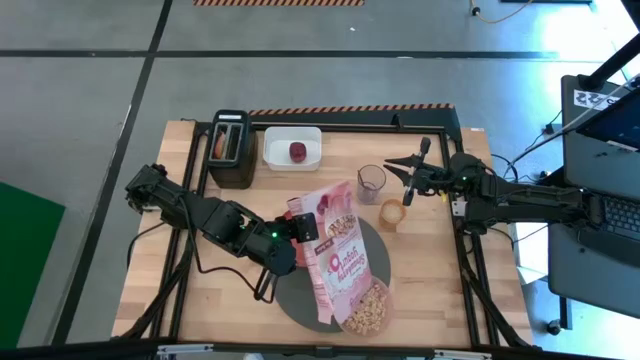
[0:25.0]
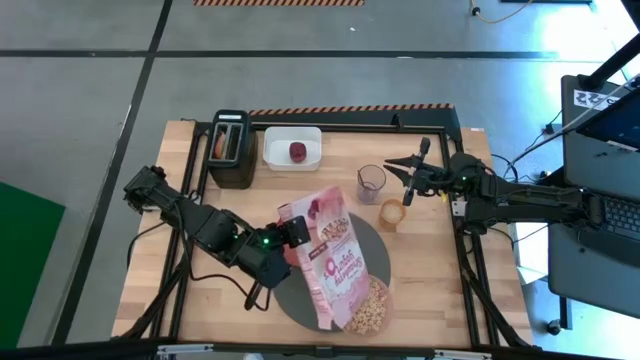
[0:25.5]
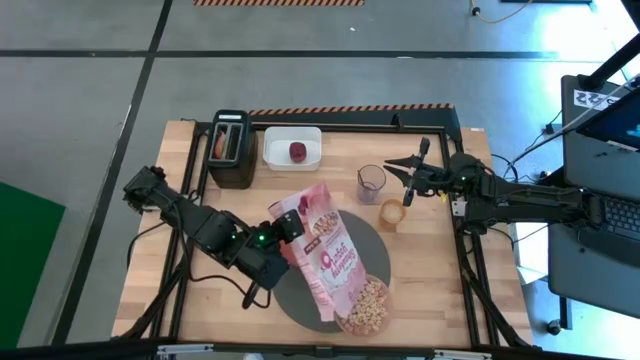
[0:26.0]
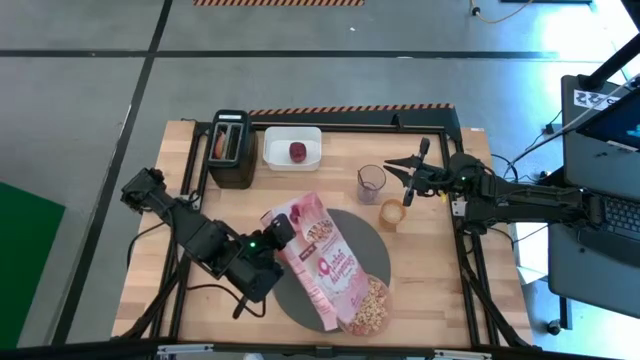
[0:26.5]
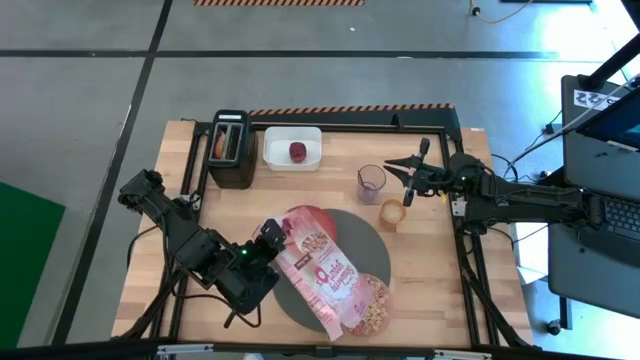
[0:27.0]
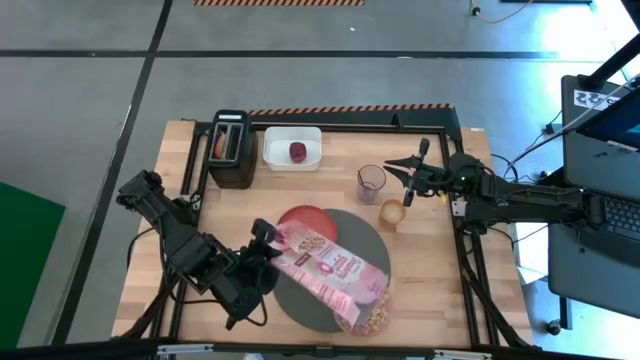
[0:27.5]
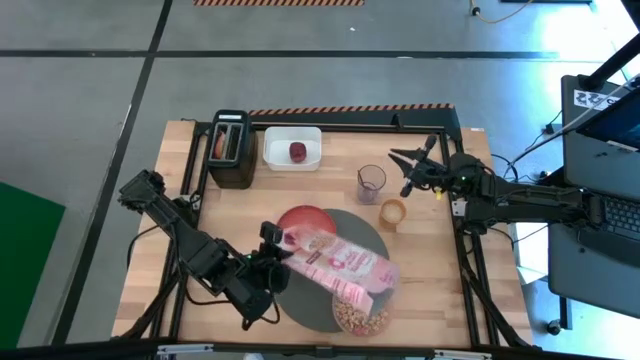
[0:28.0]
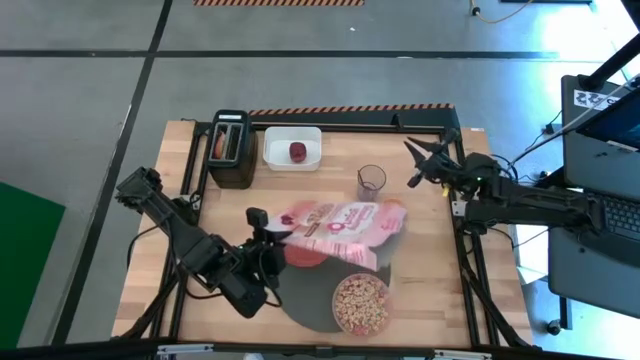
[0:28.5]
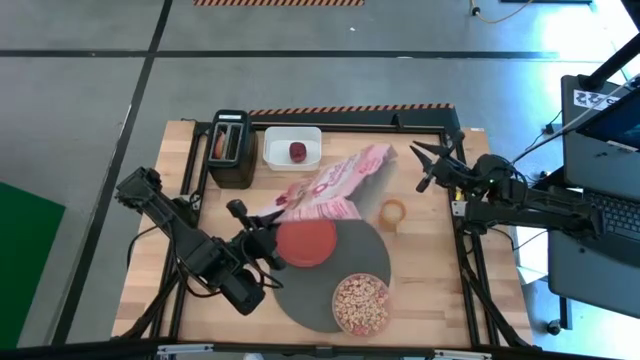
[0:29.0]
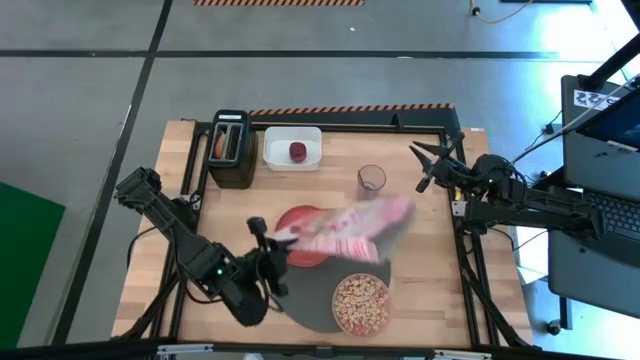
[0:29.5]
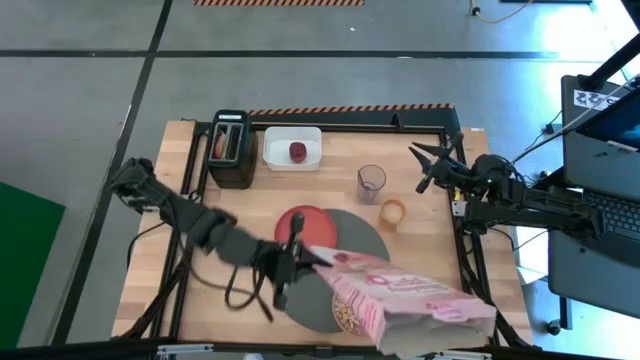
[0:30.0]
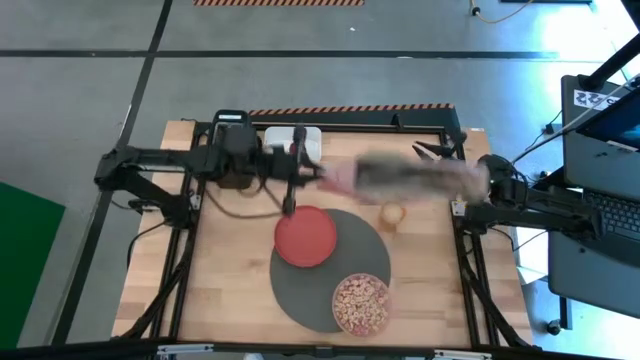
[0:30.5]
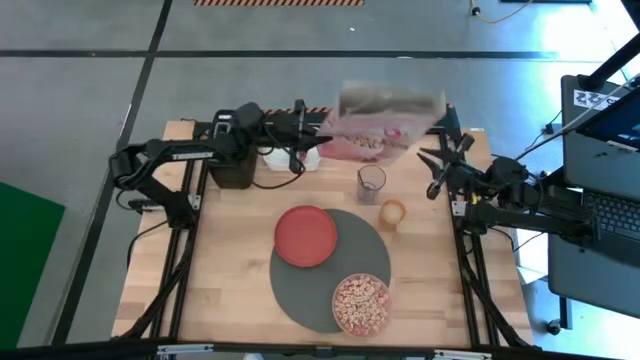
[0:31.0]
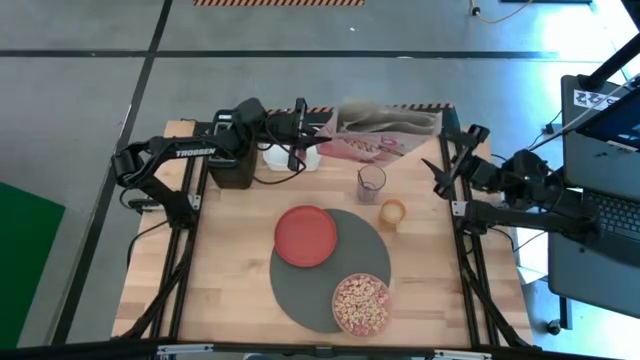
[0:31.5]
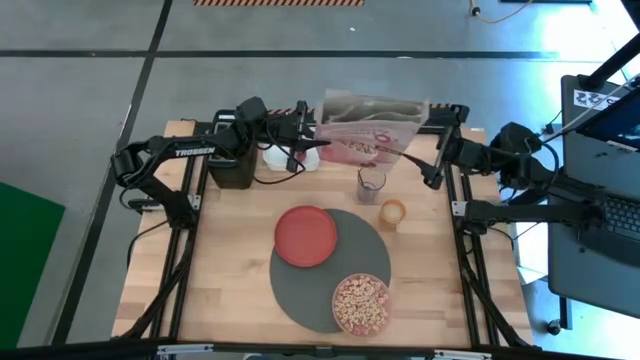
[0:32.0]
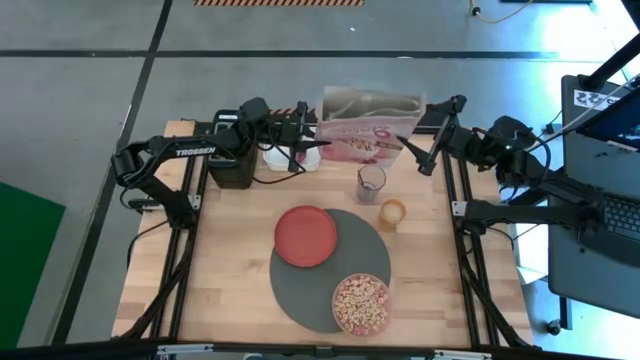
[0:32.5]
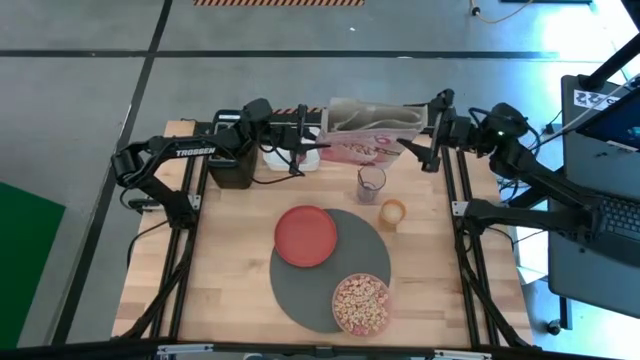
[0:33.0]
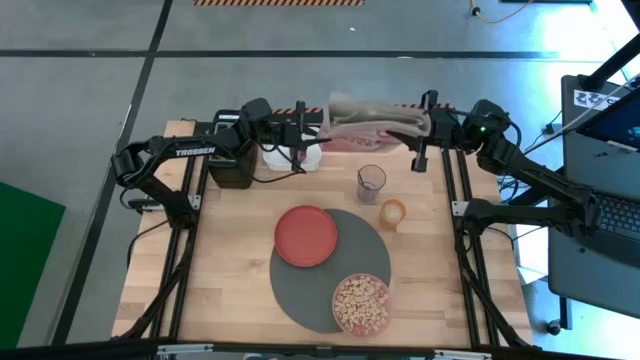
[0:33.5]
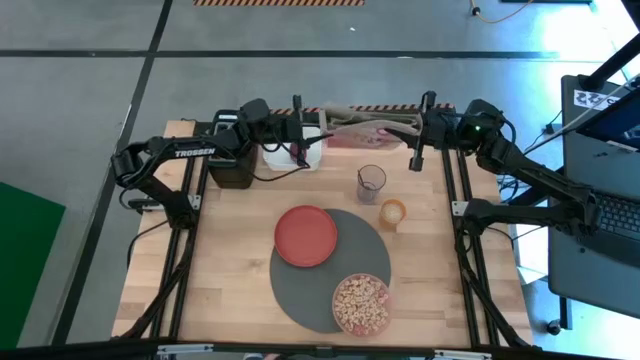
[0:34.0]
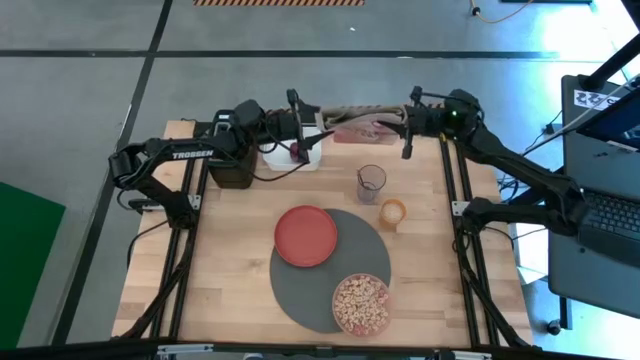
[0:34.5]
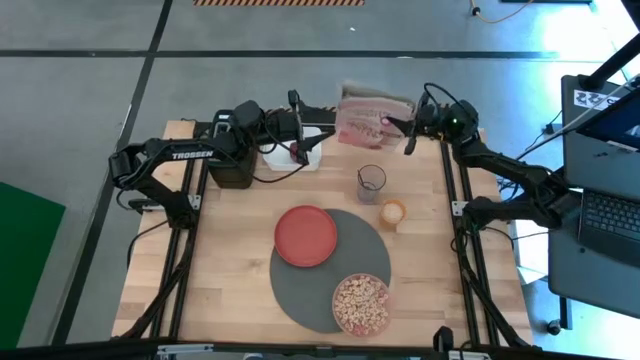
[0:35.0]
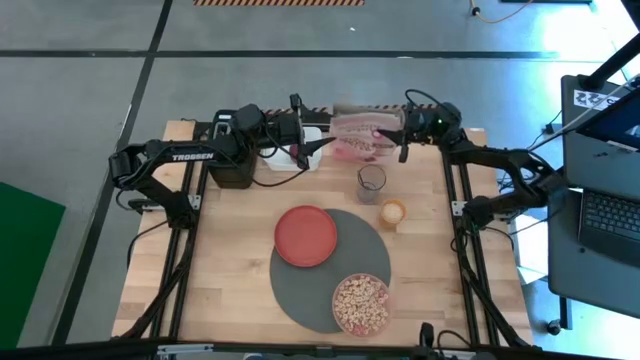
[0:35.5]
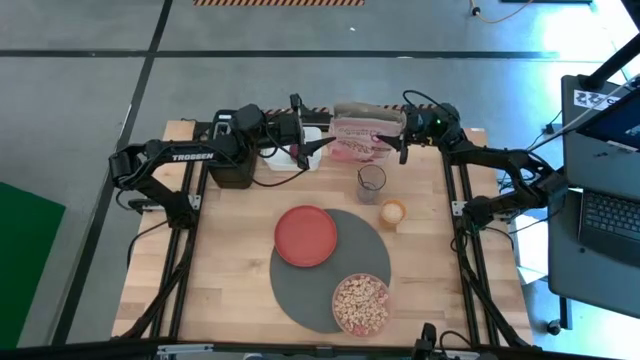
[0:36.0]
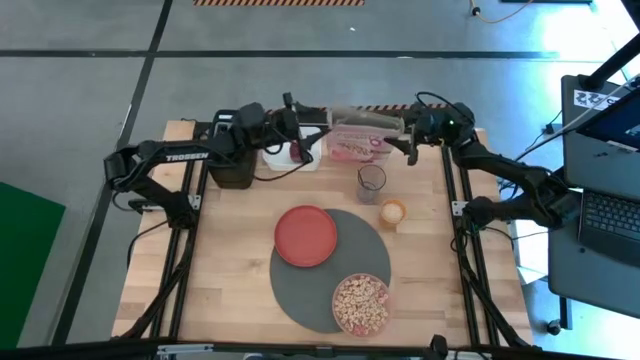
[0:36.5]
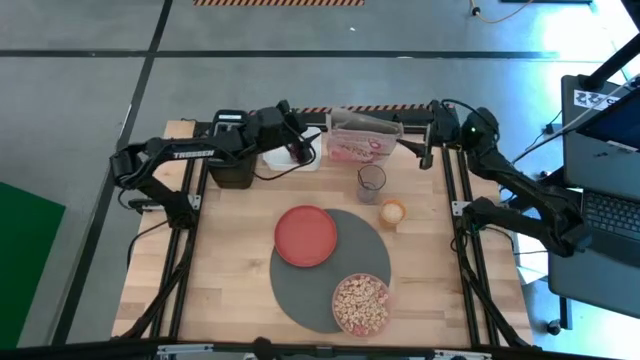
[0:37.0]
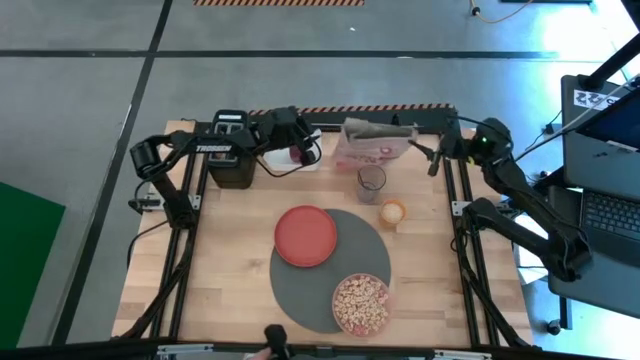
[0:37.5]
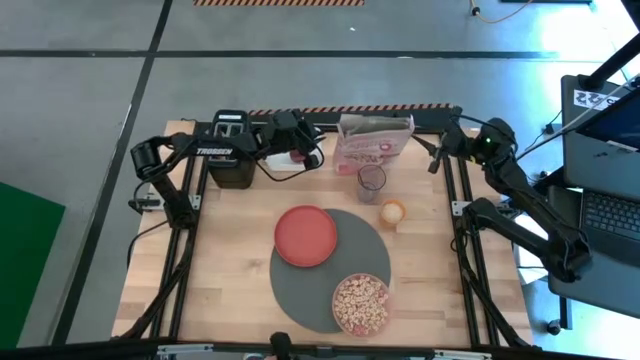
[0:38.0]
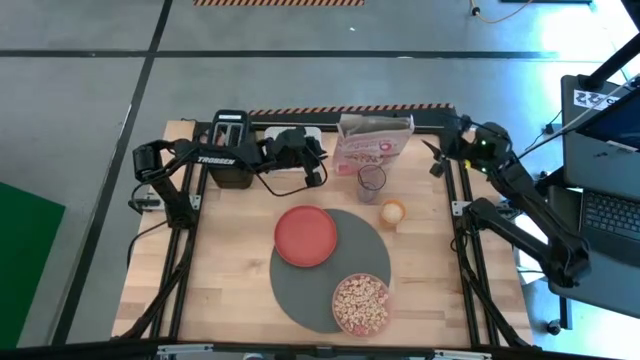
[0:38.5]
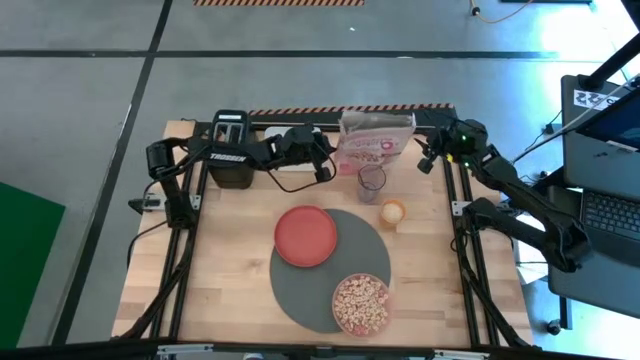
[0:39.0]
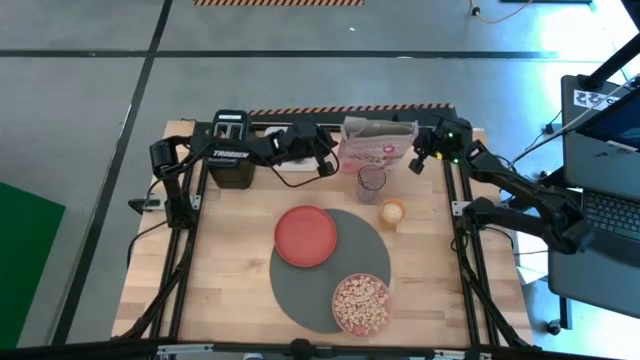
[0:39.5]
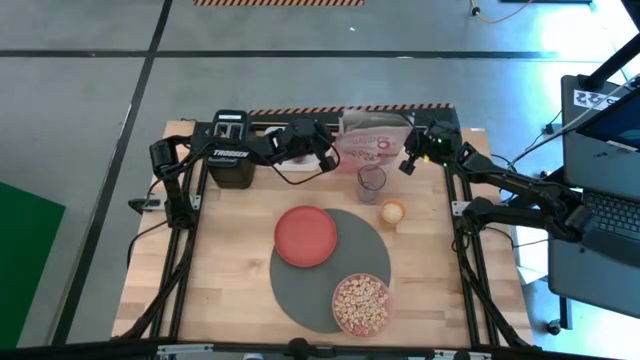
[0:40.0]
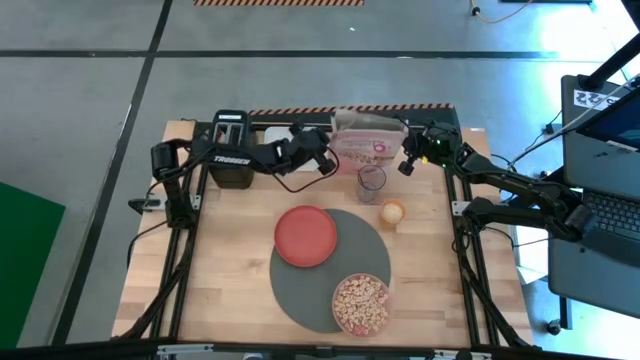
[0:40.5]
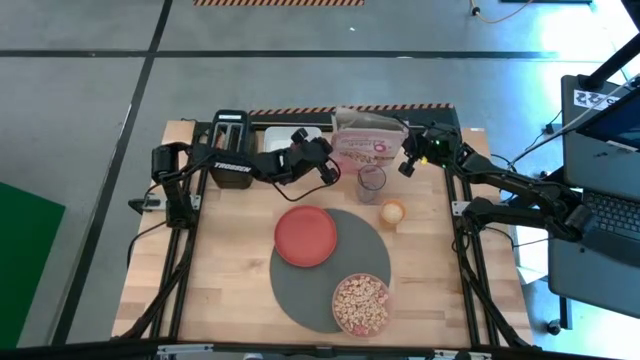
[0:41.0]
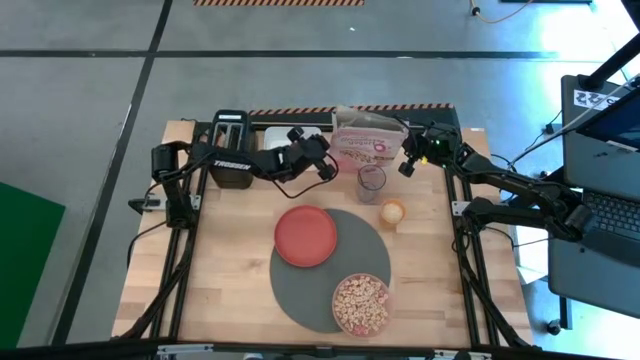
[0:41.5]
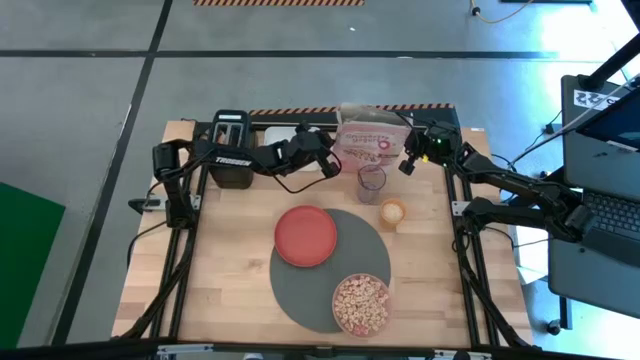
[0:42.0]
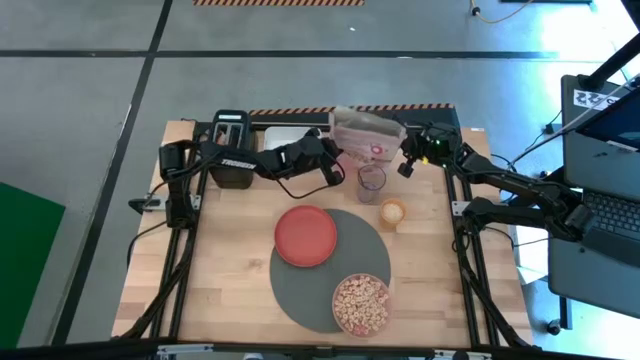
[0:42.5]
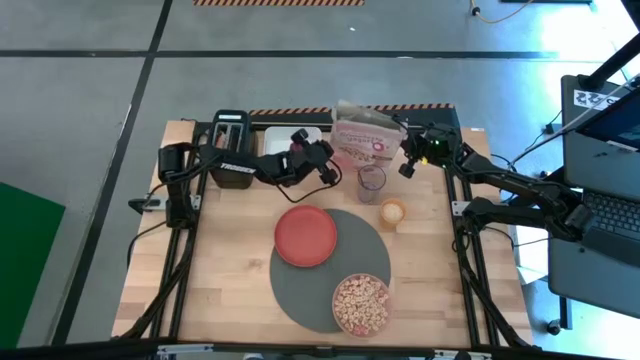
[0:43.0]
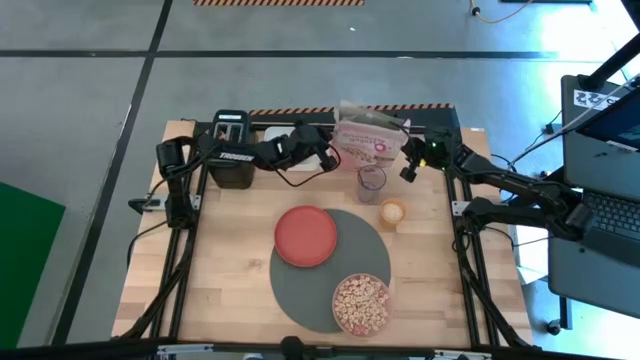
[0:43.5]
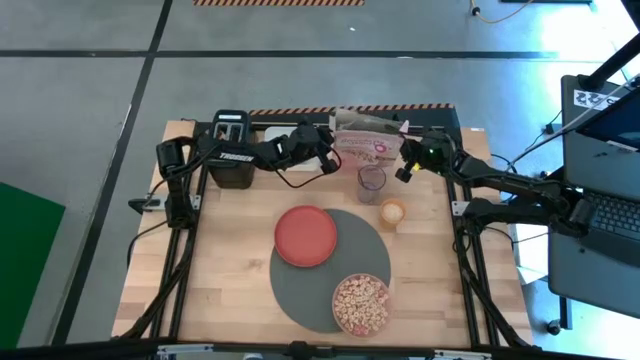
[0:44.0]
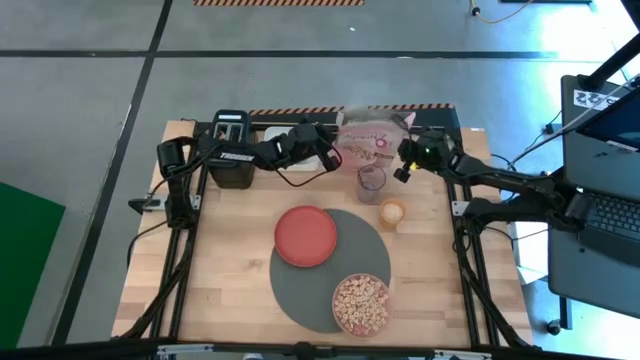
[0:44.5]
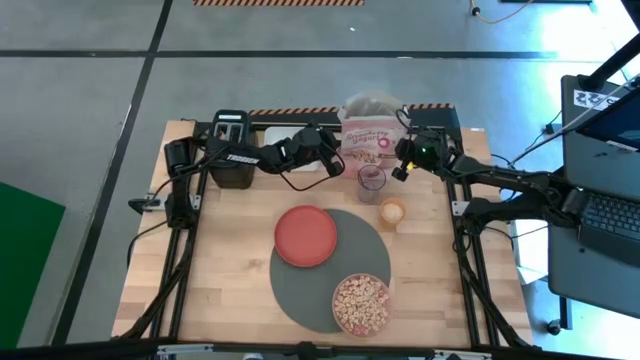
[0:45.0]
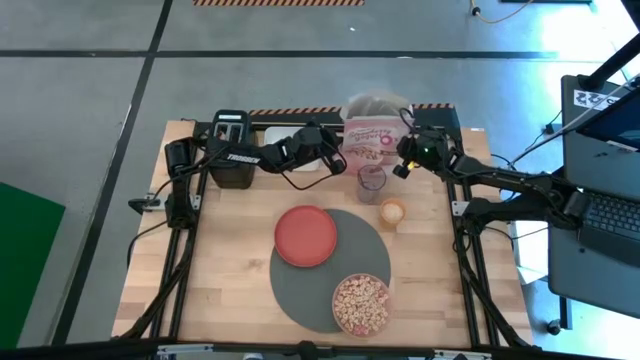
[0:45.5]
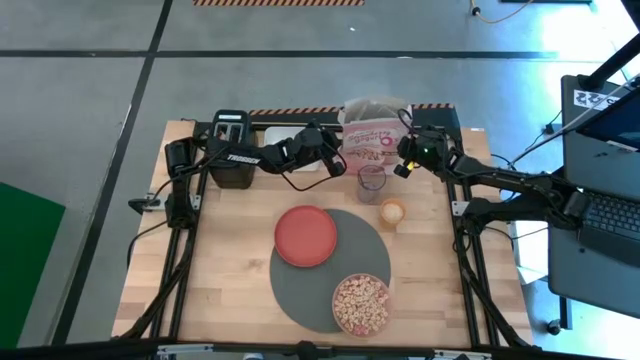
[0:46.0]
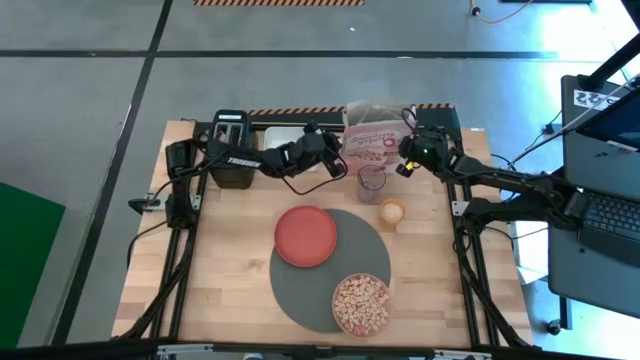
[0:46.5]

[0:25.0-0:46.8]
Task: Arrange a breakfast setting
Pour the cereal into the pink bowl
